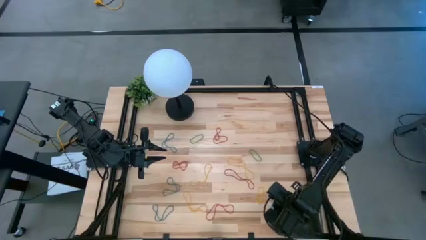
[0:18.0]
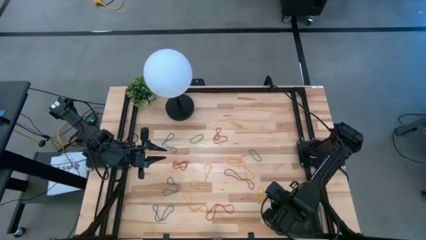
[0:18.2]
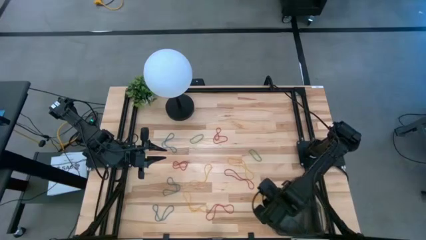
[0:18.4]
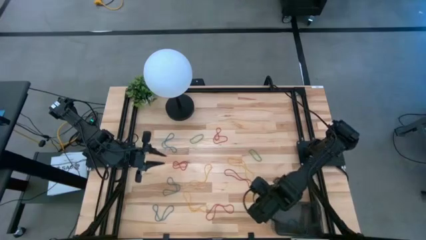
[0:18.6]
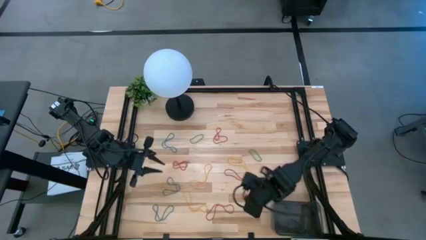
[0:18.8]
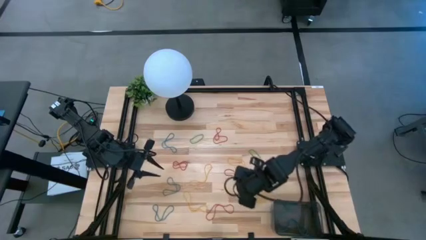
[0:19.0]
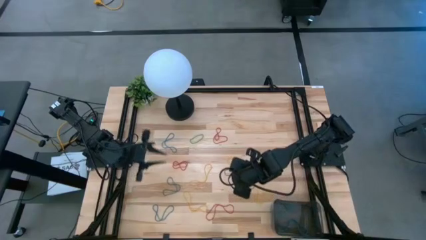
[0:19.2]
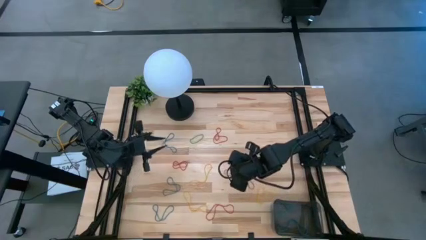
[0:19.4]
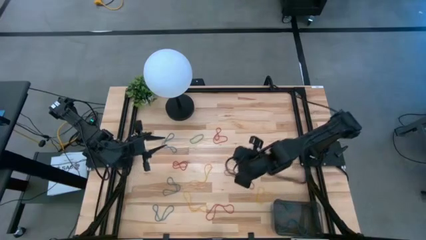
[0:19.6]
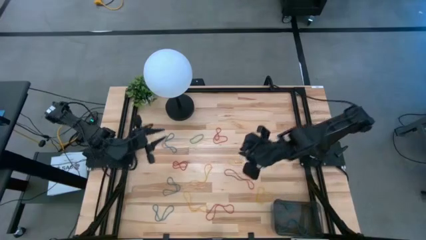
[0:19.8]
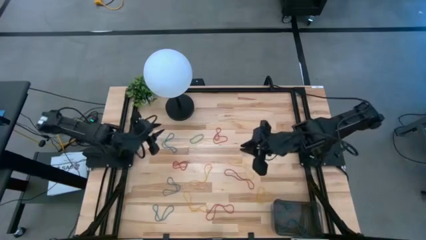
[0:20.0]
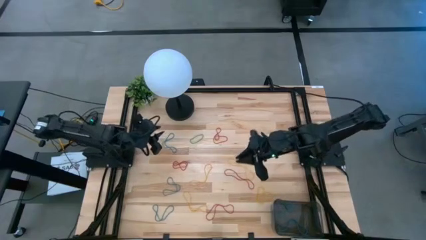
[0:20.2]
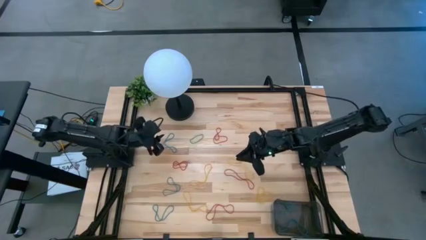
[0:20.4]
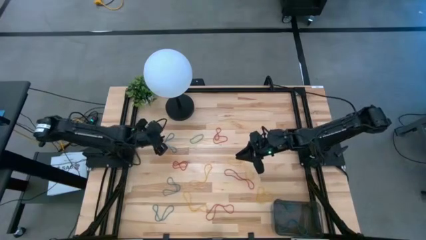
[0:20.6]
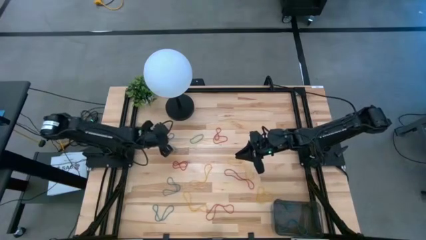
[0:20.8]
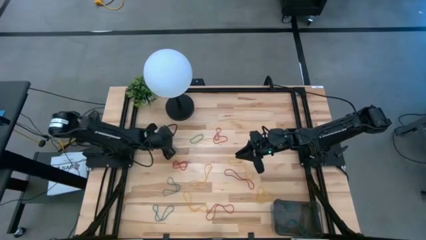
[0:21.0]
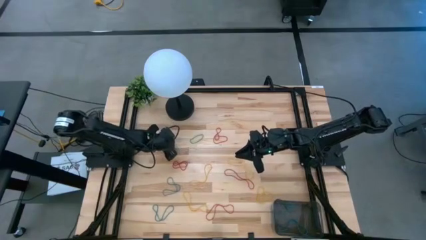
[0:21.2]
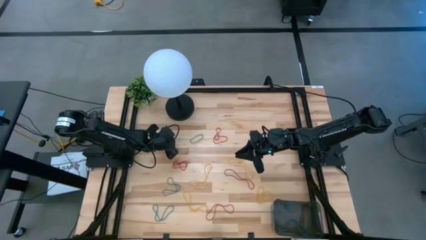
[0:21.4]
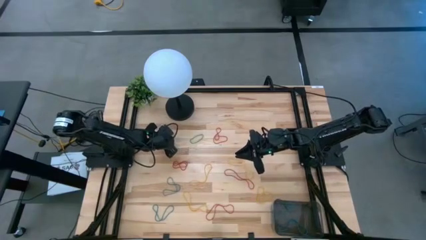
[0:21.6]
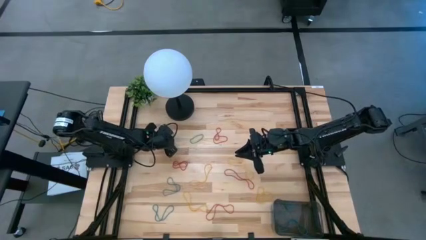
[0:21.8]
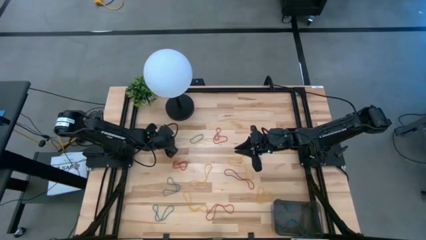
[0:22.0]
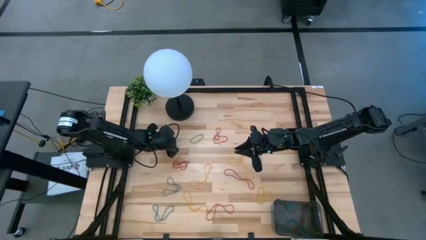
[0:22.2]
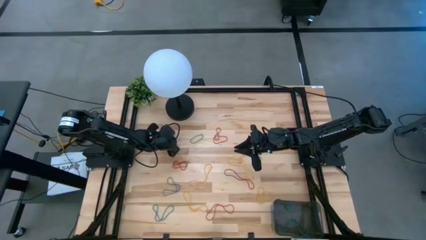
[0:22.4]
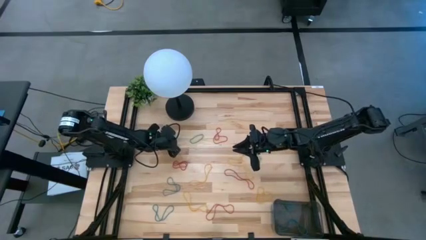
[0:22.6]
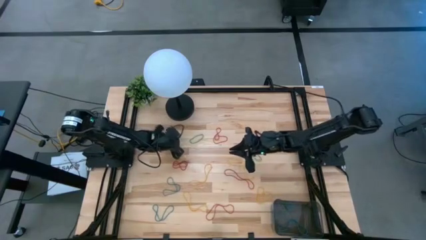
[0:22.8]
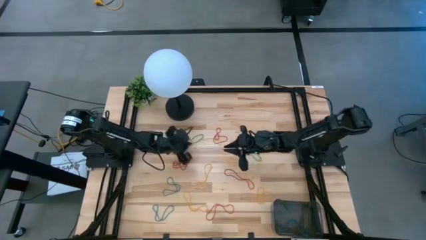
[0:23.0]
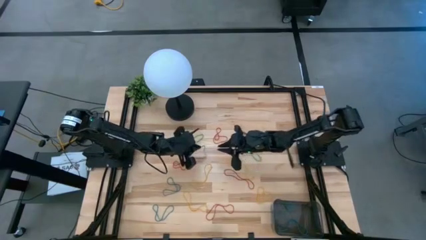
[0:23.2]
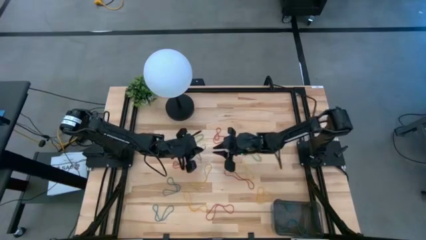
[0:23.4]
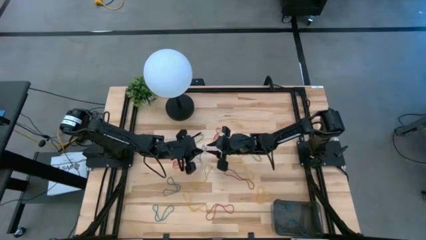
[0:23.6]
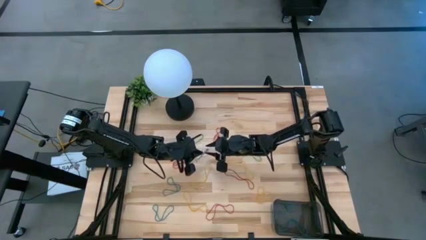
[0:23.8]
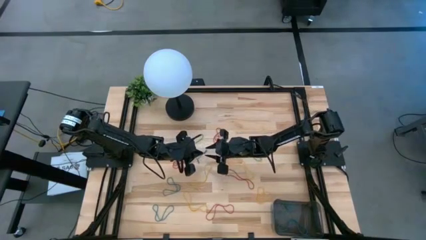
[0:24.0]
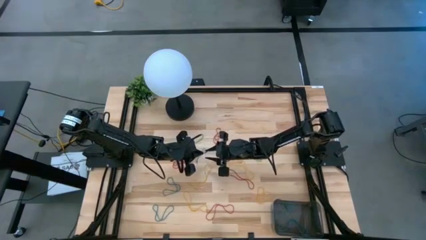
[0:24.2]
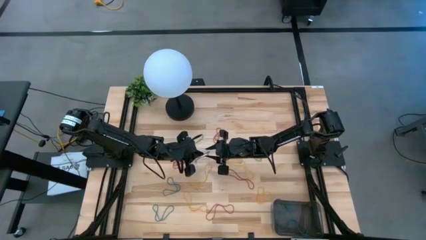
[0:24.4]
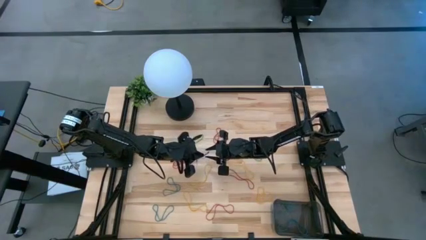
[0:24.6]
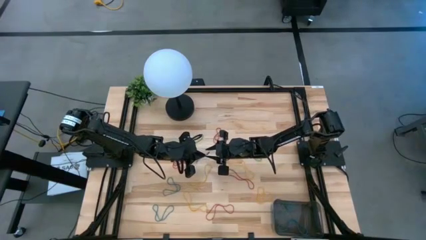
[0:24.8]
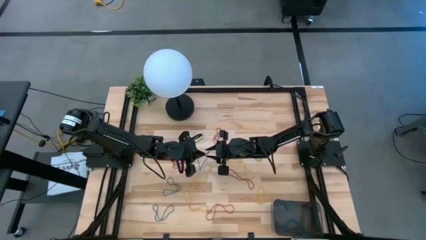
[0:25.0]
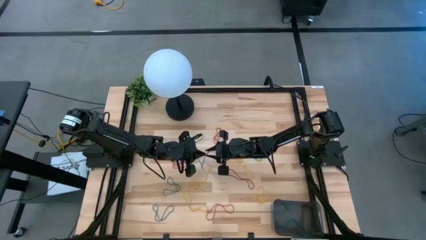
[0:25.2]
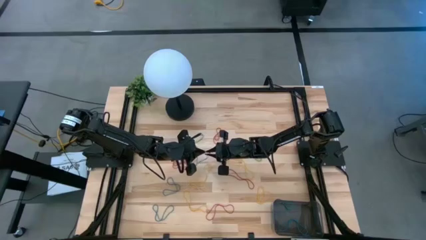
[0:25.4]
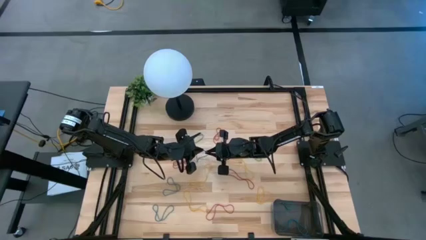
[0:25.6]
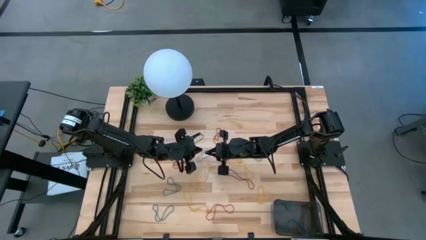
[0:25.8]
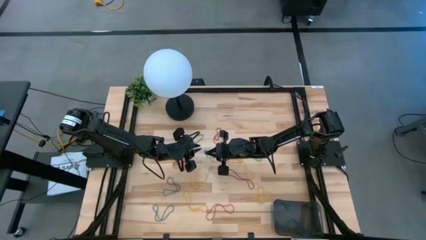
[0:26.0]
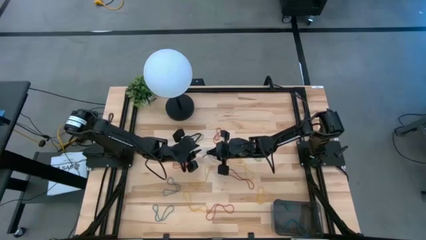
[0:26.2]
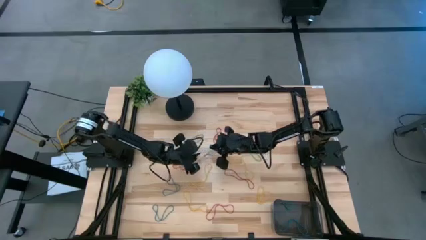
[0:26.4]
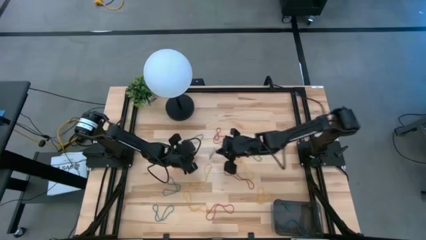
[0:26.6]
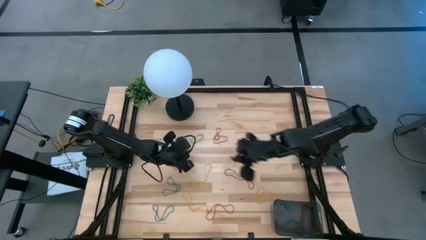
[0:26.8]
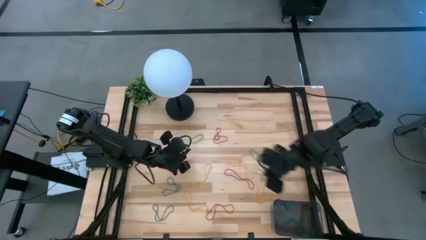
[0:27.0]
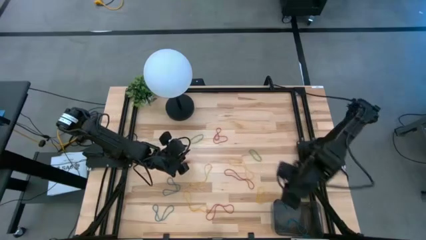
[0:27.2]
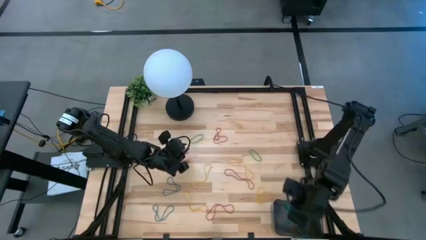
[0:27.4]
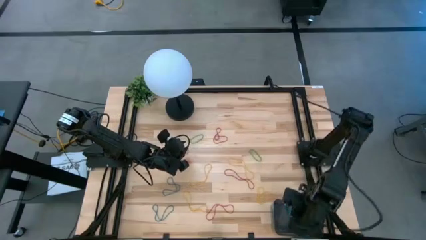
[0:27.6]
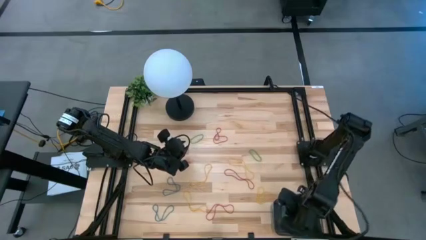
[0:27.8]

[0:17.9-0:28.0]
Task: Pick and place items into bin
Put the blue rubber band into the black bin

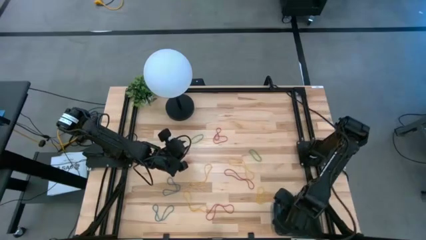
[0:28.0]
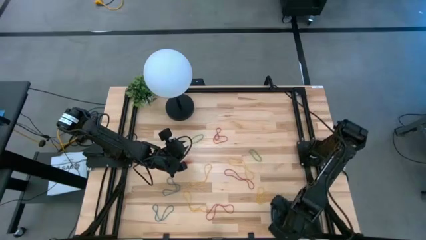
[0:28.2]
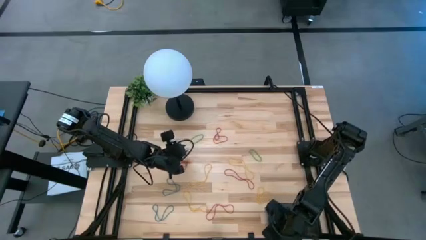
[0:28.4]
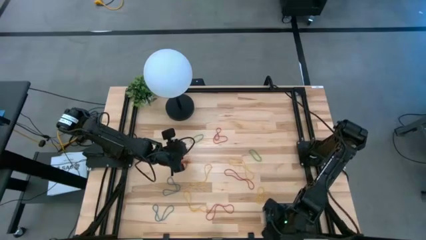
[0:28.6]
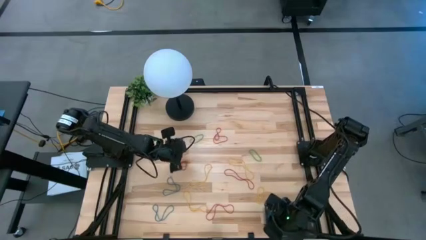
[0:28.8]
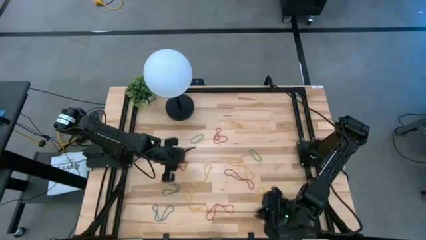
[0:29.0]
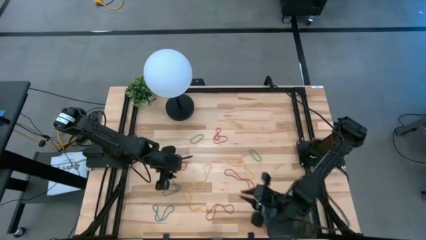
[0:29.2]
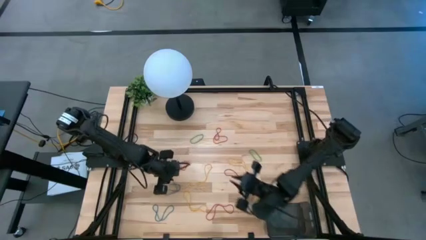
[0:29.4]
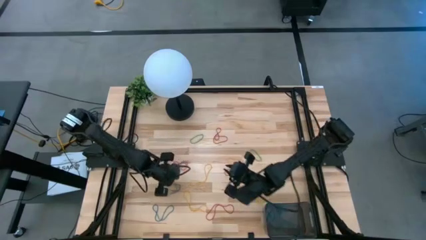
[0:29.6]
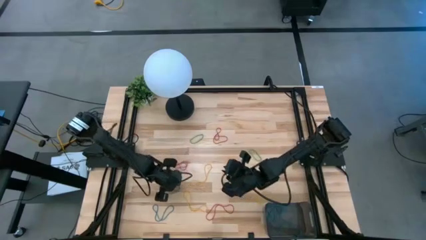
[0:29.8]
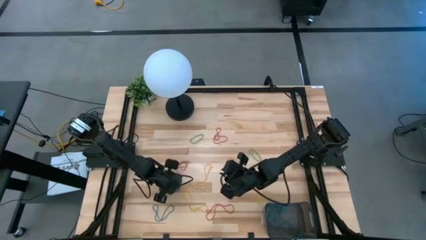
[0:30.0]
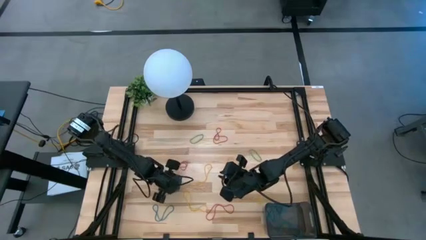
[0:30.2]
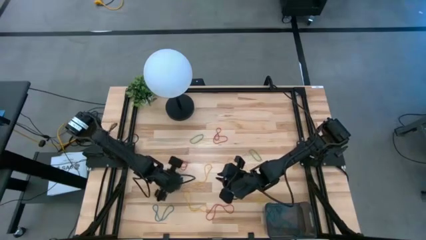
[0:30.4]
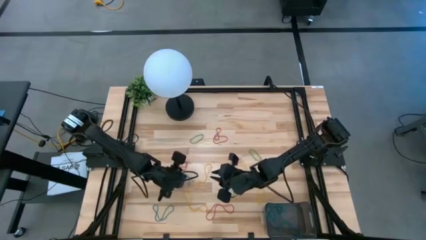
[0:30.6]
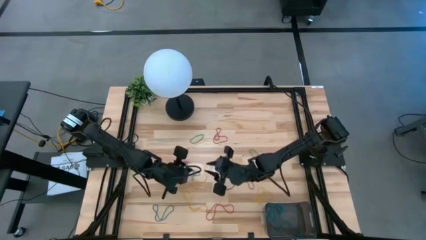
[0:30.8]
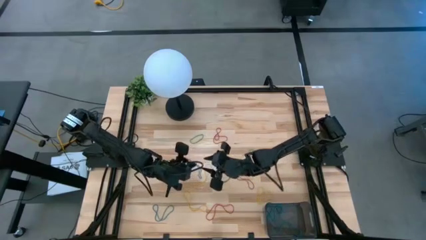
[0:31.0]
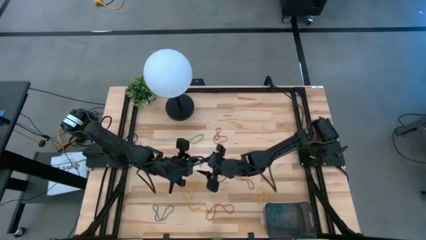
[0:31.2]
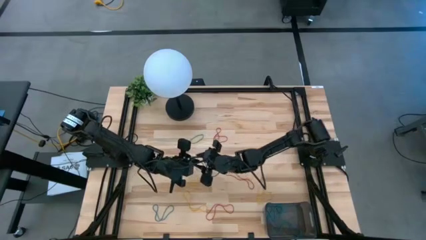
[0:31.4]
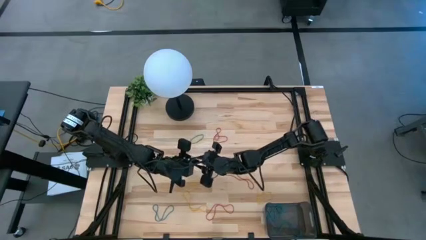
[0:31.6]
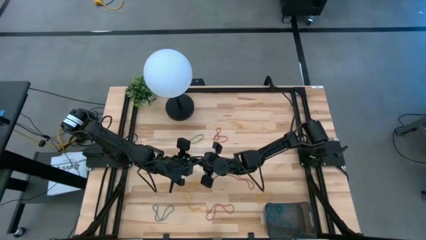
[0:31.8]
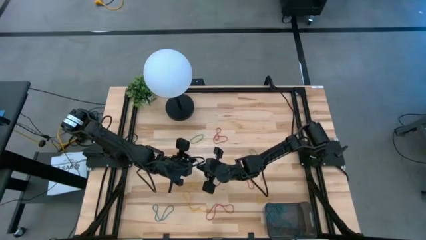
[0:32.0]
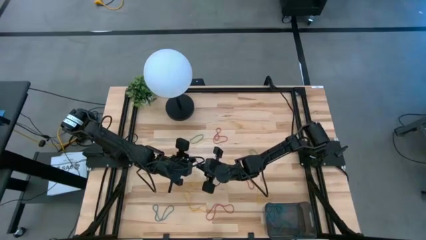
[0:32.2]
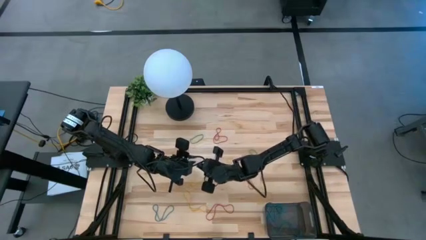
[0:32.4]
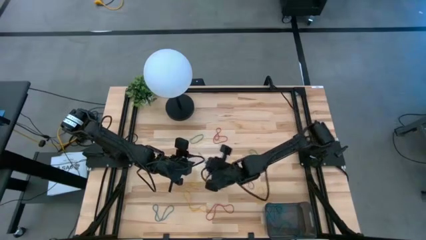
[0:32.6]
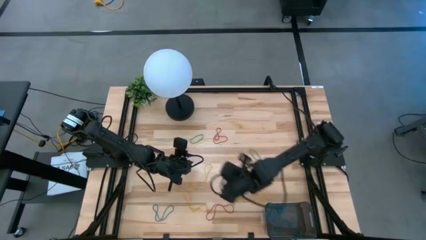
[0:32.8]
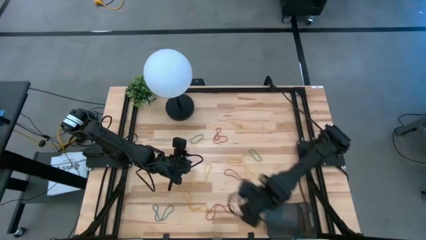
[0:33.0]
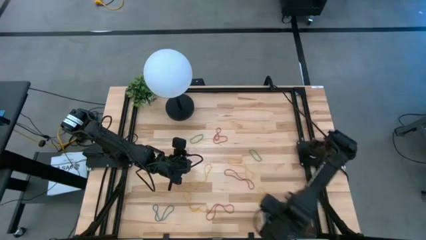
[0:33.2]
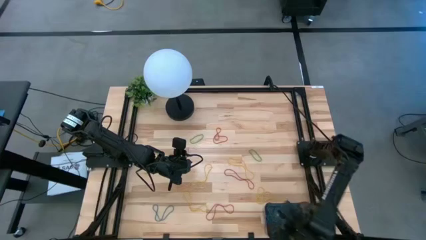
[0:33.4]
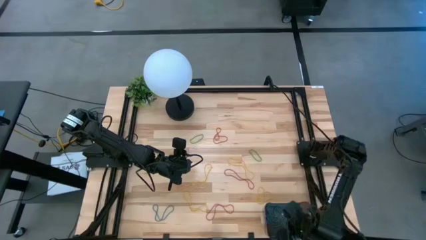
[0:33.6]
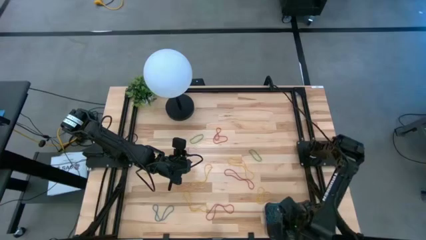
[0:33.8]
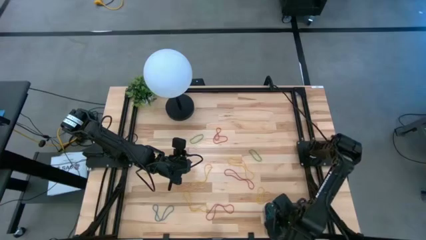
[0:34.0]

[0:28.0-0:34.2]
Put the blue rubber band into the black bin

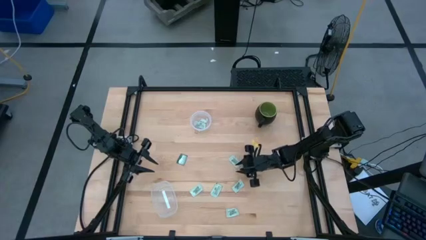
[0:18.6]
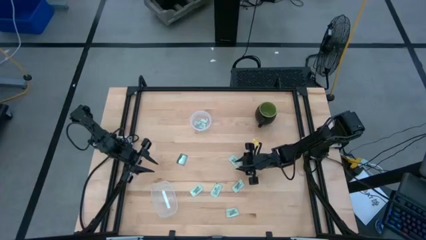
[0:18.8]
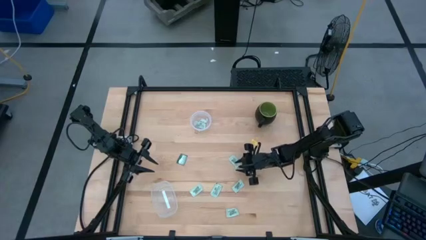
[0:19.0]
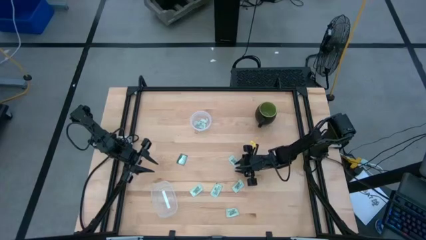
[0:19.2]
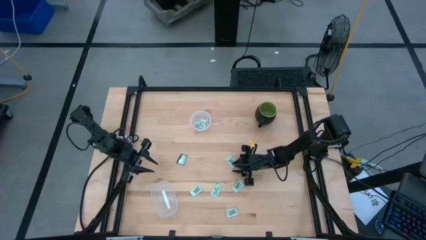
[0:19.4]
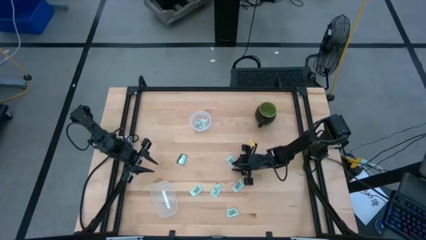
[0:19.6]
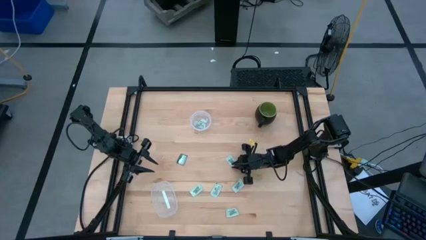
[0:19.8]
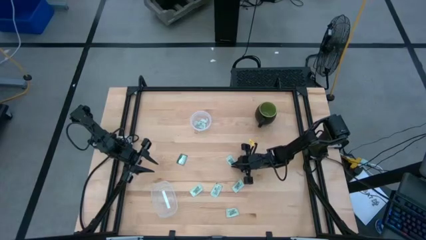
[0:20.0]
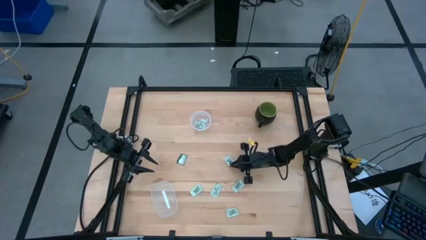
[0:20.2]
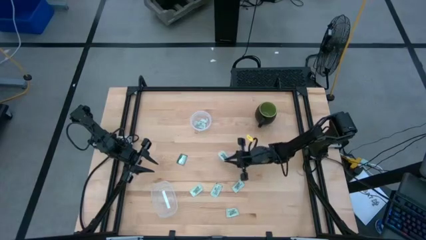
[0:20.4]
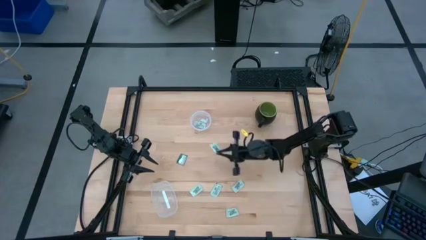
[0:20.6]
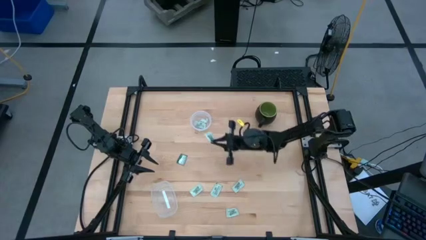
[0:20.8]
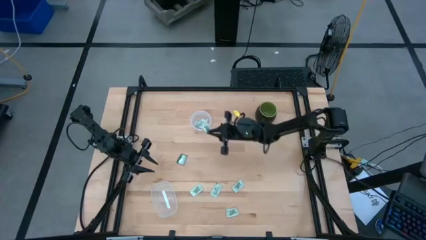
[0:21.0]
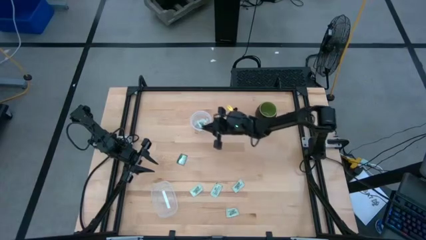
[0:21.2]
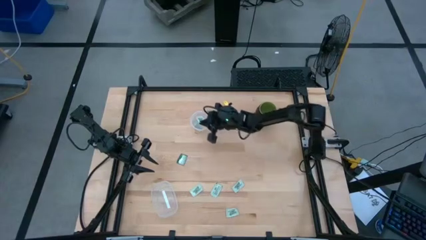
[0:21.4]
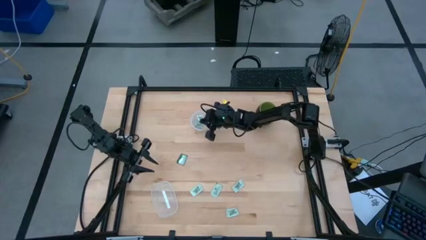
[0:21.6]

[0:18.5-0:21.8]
Task: Pick and place Stevia / Truvia into bins
Put the stevia packet into the transparent circle container
